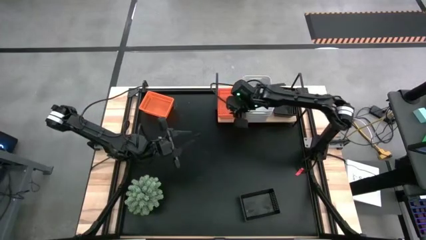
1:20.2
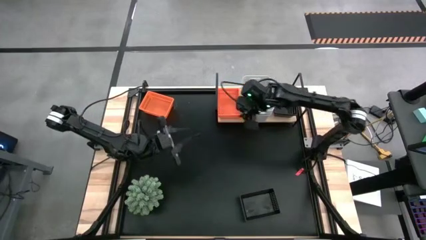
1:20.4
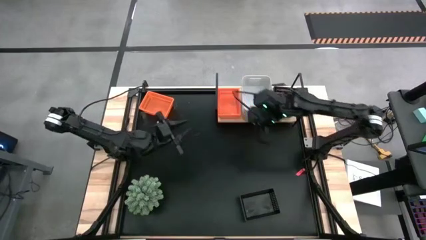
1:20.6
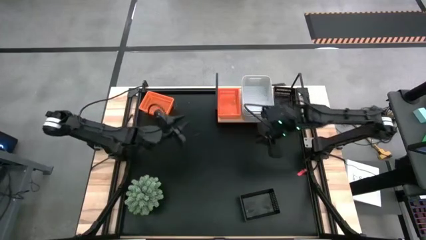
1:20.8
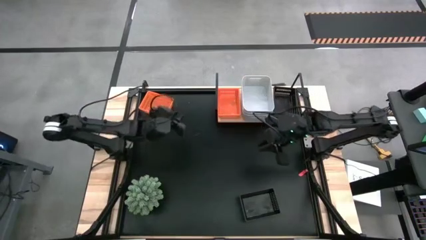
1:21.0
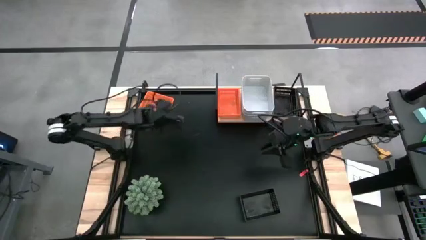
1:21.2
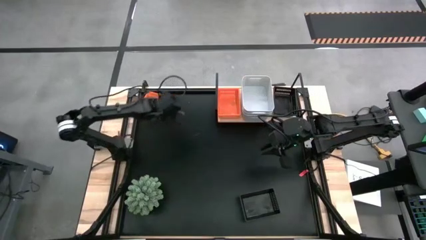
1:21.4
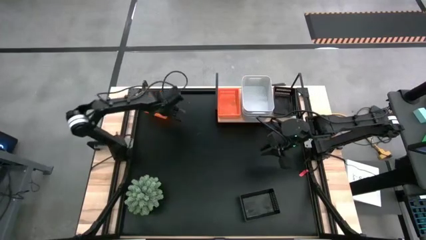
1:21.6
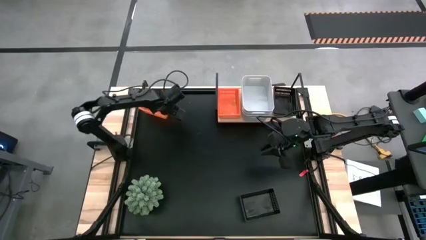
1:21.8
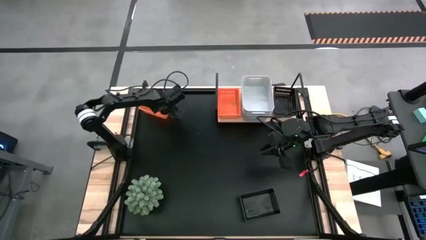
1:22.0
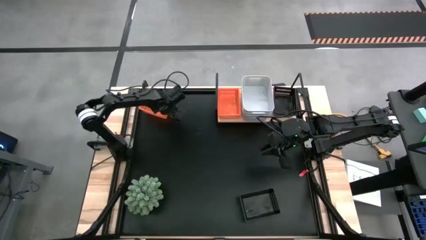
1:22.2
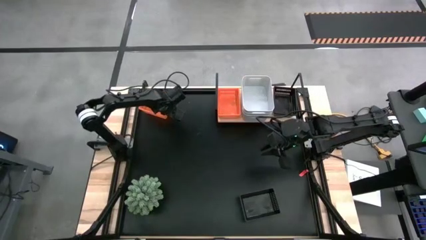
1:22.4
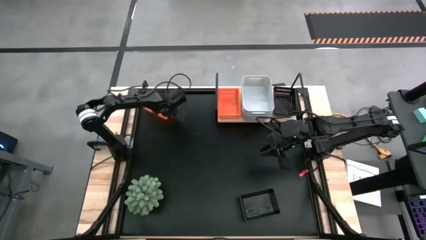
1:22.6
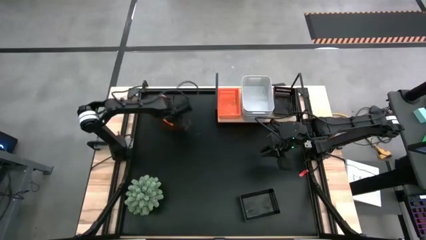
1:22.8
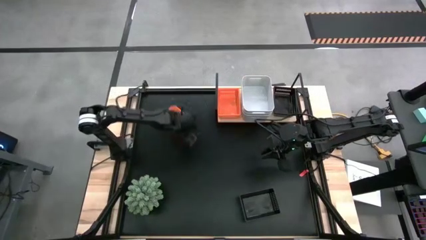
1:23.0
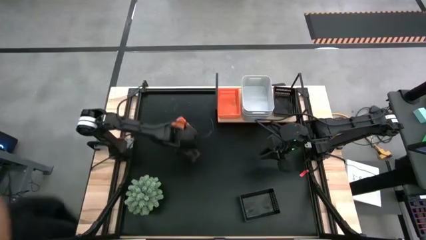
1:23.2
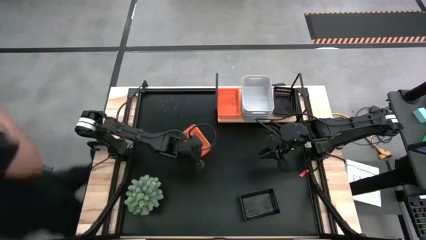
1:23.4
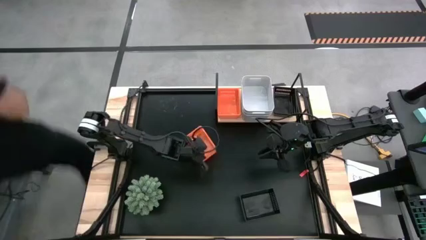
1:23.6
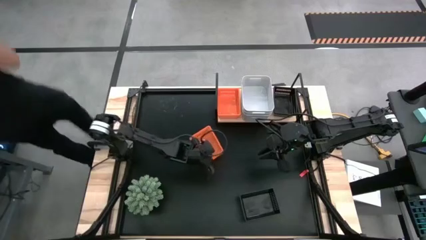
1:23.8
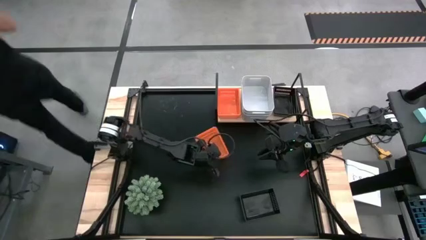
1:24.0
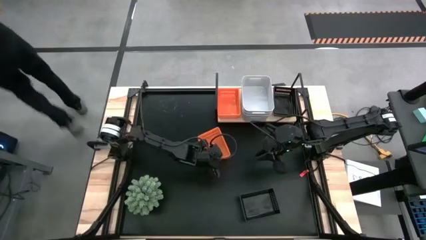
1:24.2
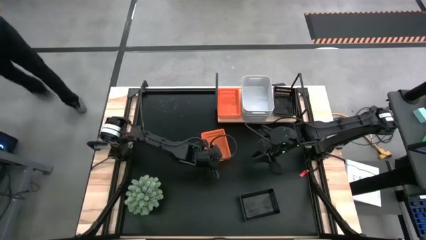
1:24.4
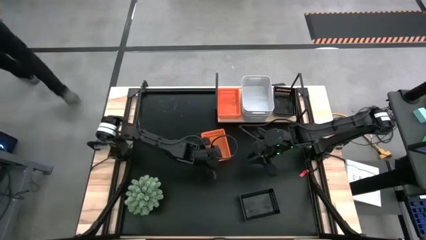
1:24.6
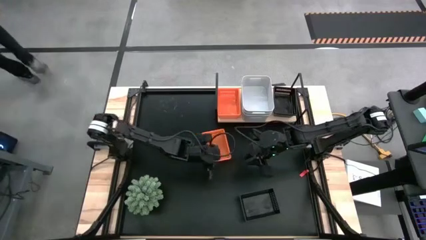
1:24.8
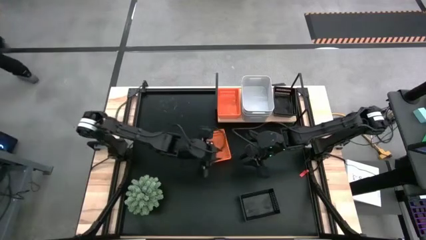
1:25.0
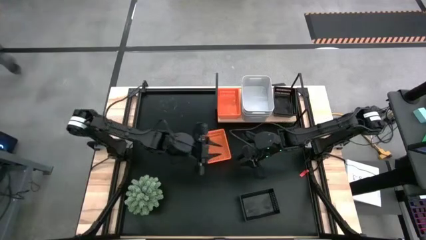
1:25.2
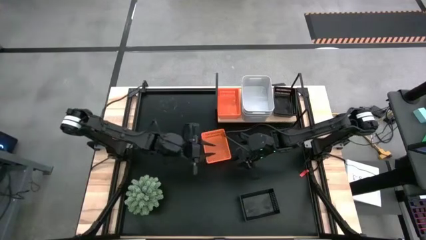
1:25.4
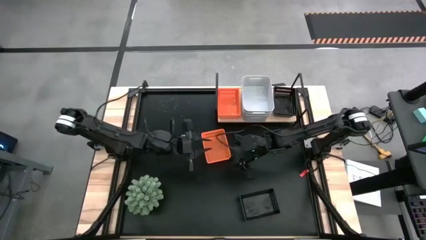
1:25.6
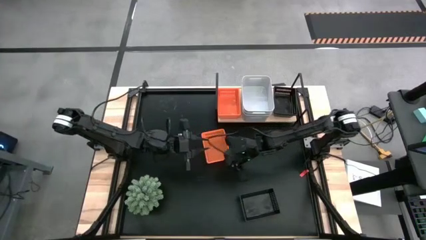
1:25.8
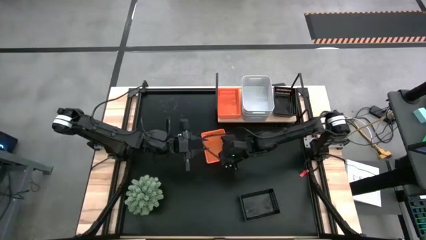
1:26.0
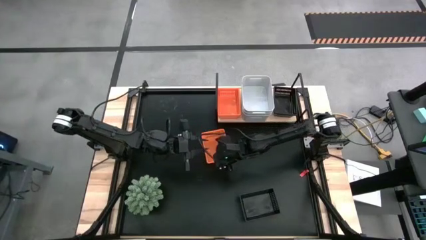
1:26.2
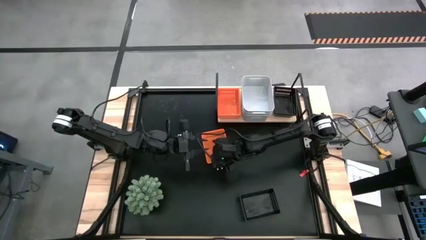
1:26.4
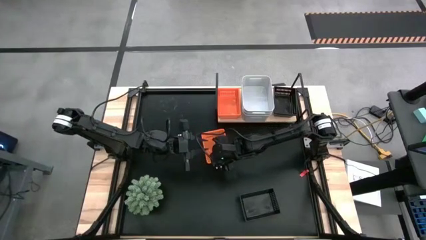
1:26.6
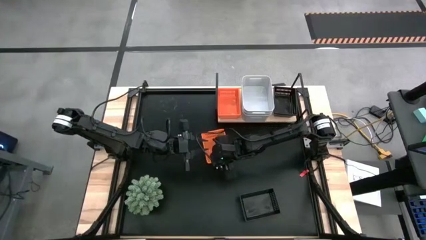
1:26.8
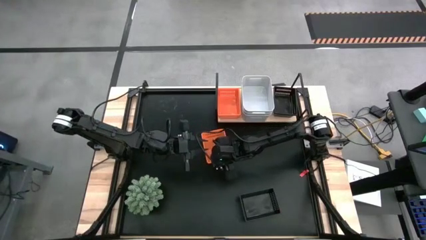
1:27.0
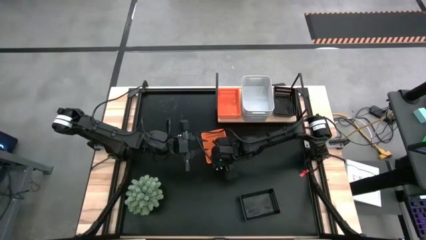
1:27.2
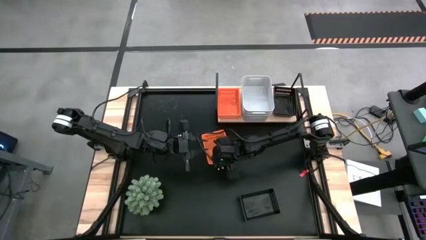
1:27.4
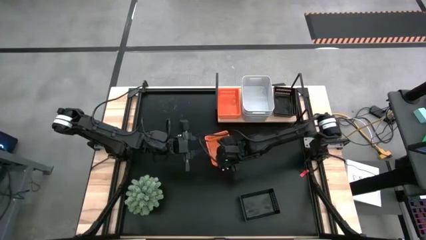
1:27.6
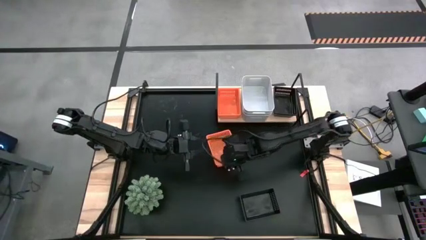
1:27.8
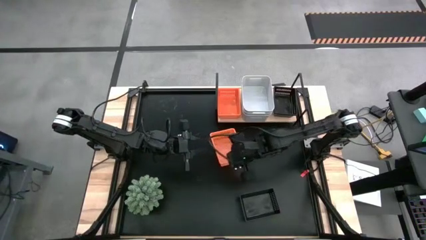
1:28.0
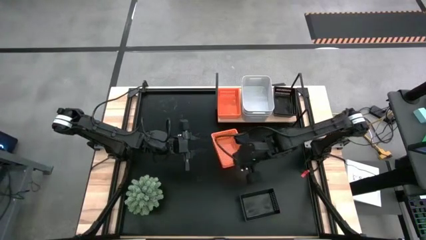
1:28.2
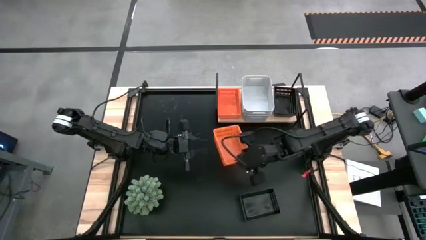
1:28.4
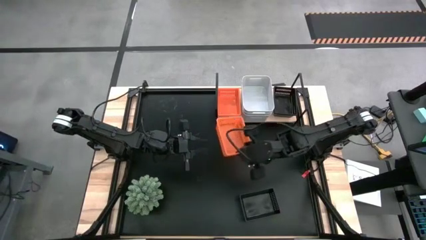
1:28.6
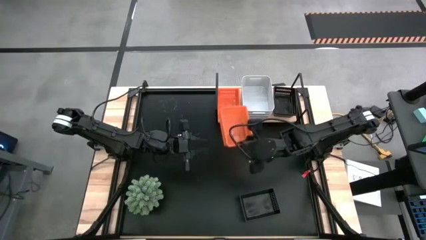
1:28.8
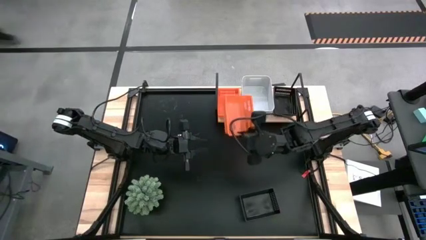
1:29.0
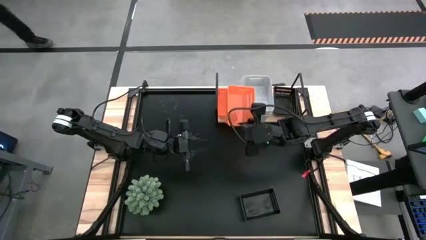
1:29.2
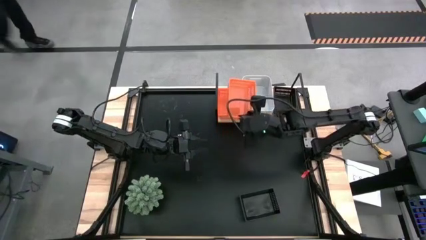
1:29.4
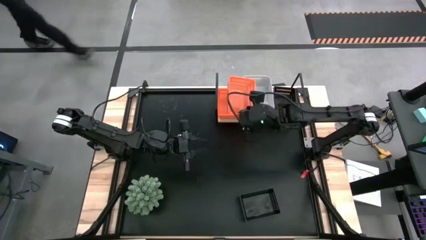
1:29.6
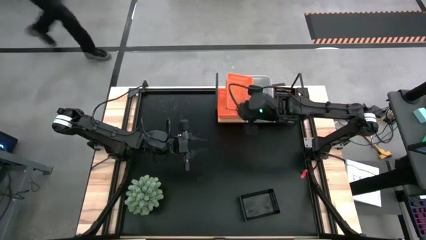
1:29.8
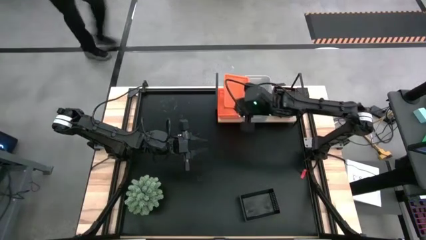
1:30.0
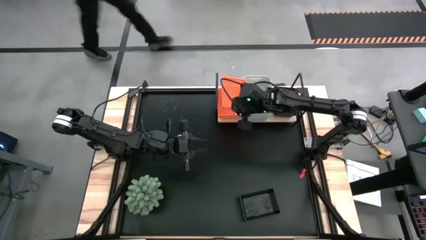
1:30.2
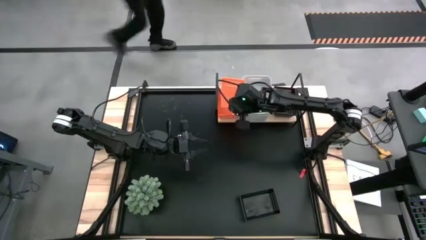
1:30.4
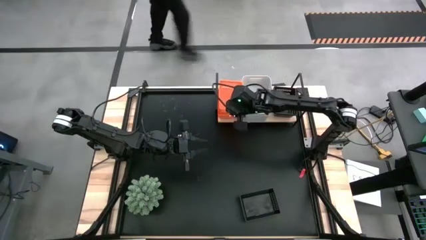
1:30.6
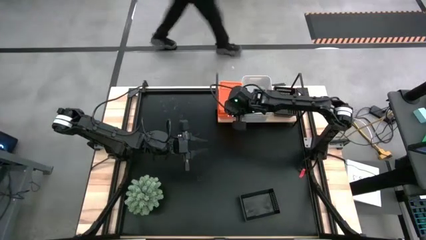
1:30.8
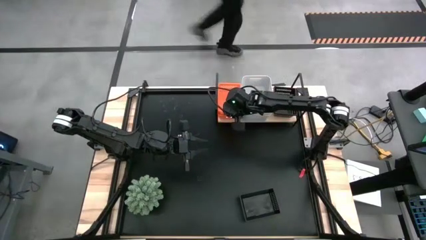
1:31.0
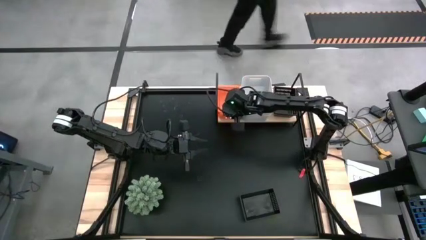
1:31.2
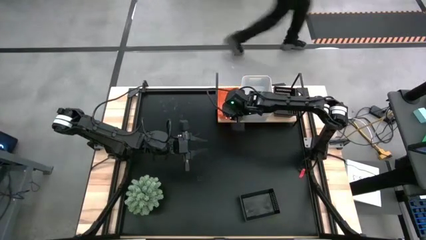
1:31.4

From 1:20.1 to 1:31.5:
Task: Stack baskets on shelf by color
Stack the orange bin on top of the orange bin on the shelf
